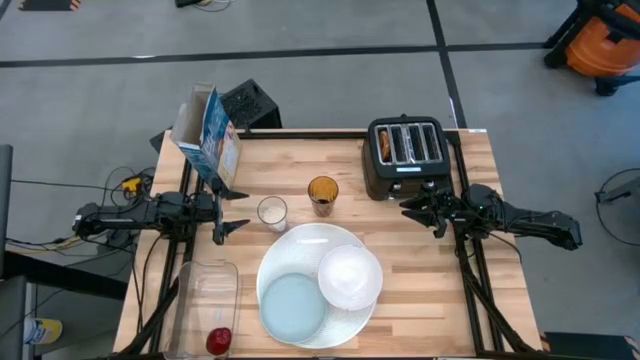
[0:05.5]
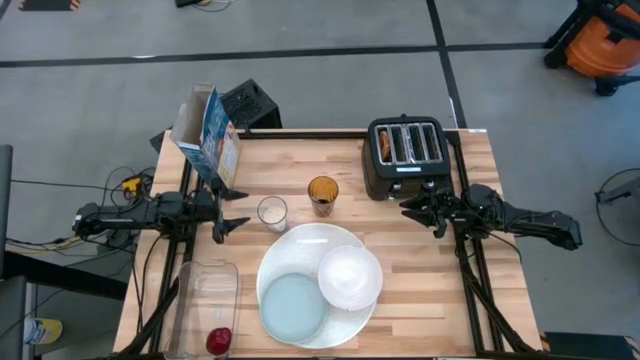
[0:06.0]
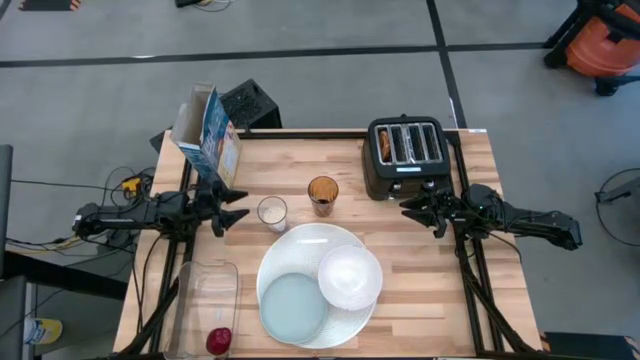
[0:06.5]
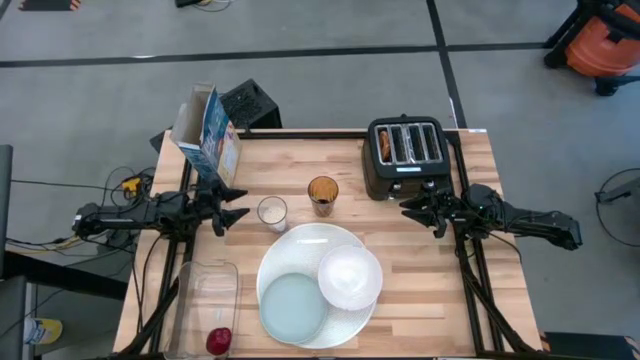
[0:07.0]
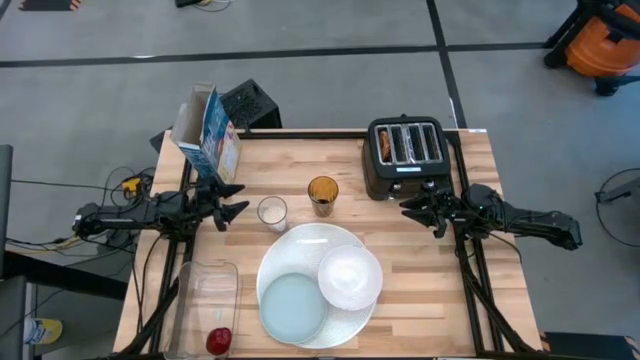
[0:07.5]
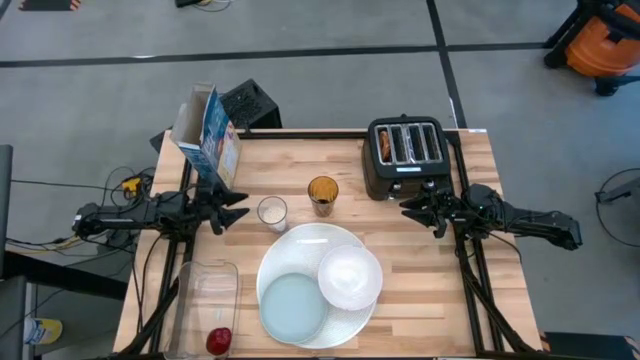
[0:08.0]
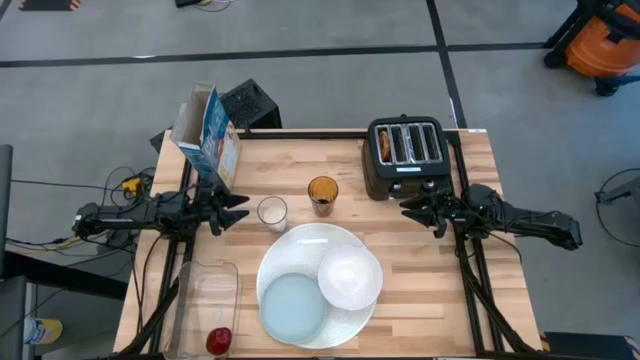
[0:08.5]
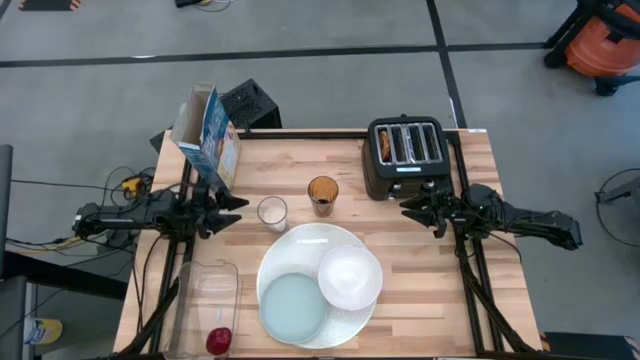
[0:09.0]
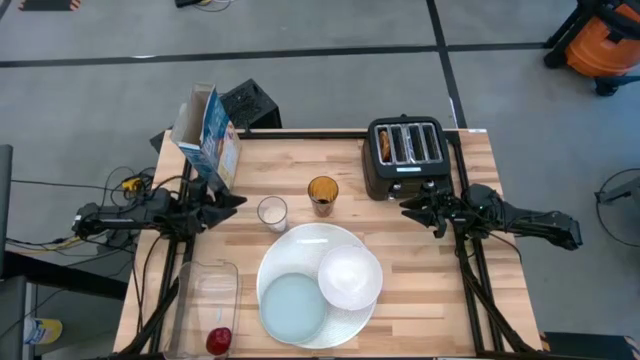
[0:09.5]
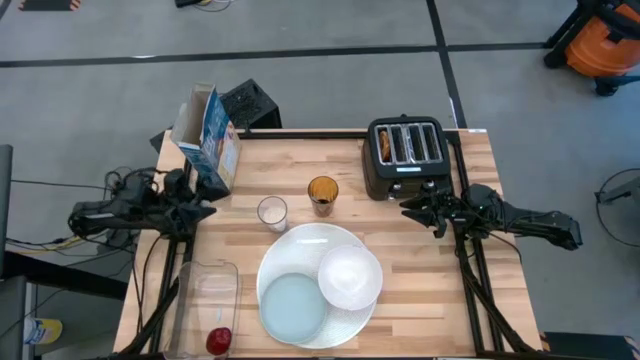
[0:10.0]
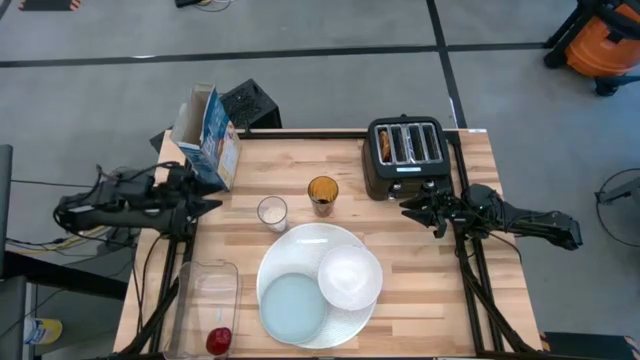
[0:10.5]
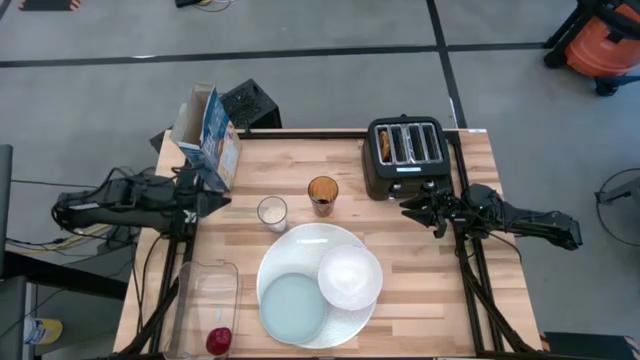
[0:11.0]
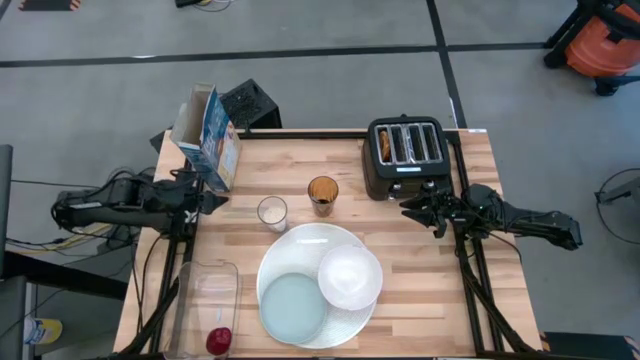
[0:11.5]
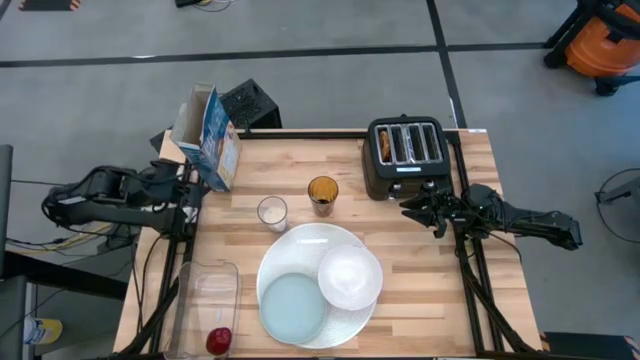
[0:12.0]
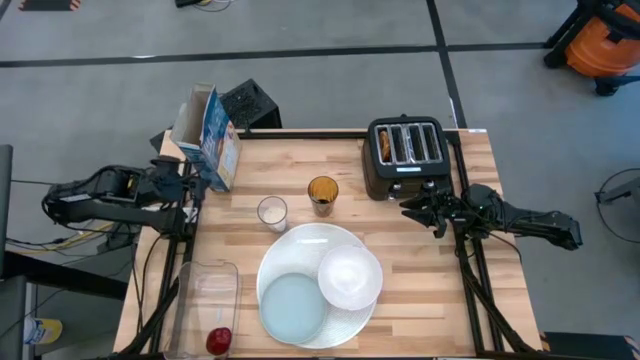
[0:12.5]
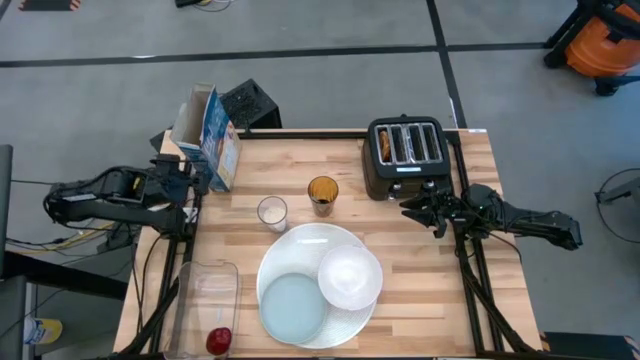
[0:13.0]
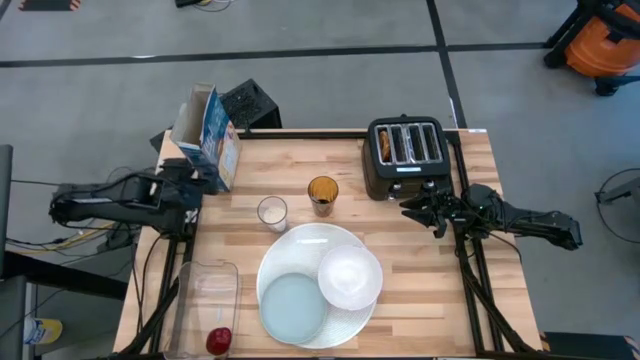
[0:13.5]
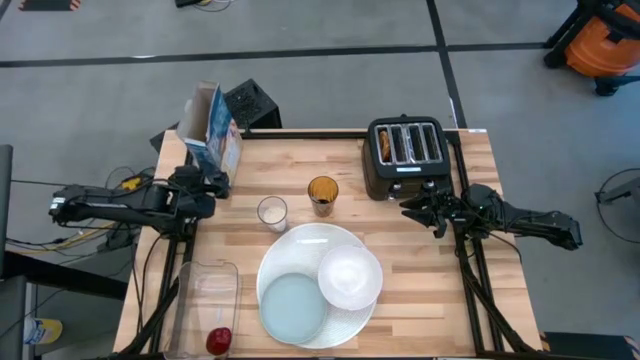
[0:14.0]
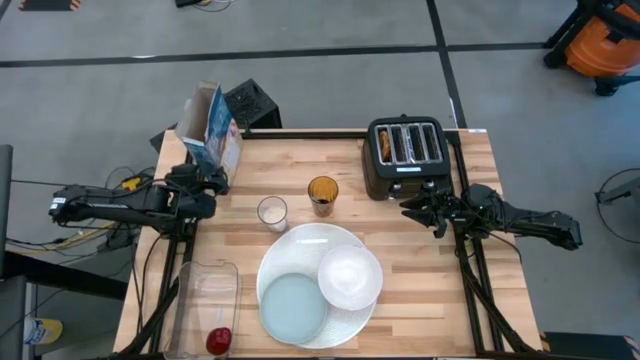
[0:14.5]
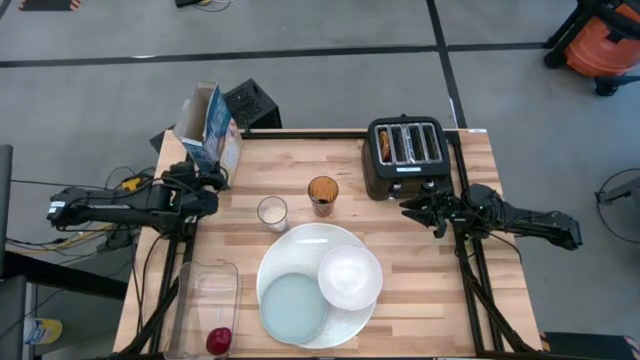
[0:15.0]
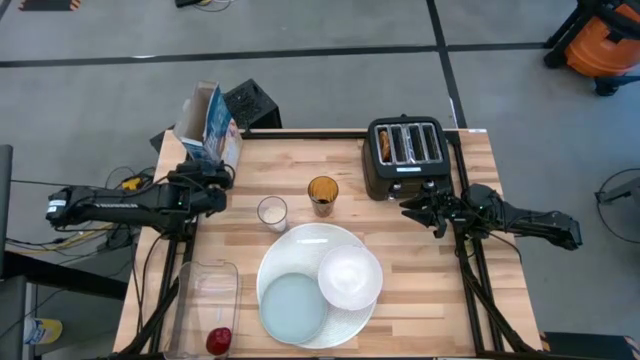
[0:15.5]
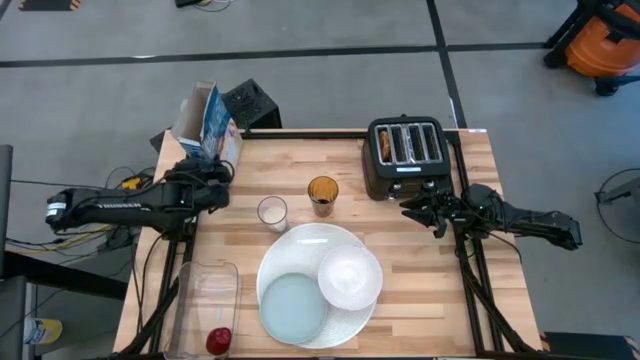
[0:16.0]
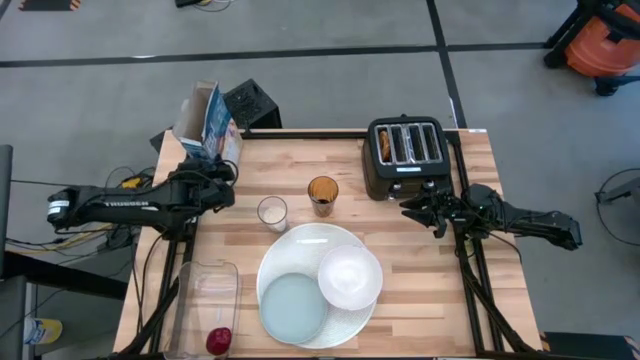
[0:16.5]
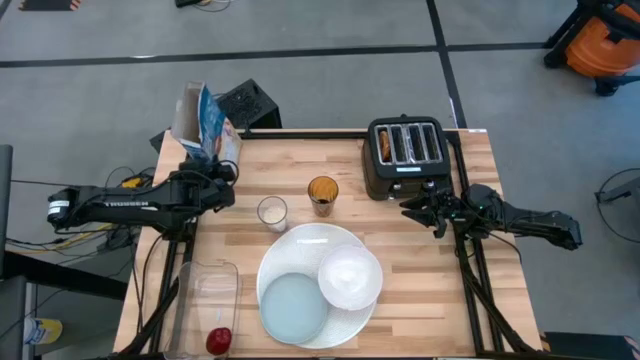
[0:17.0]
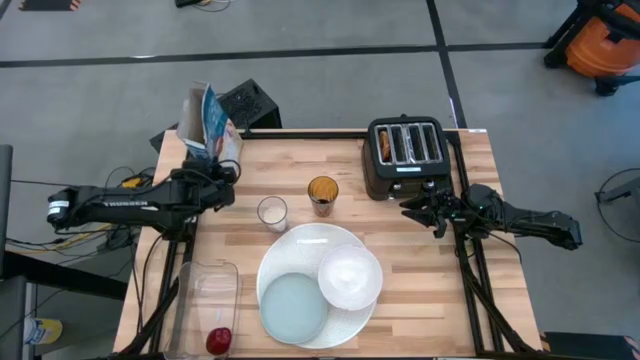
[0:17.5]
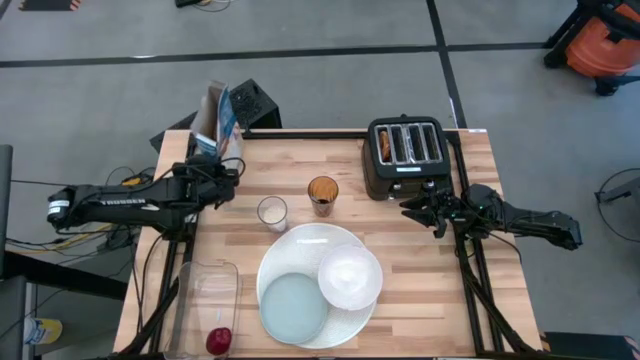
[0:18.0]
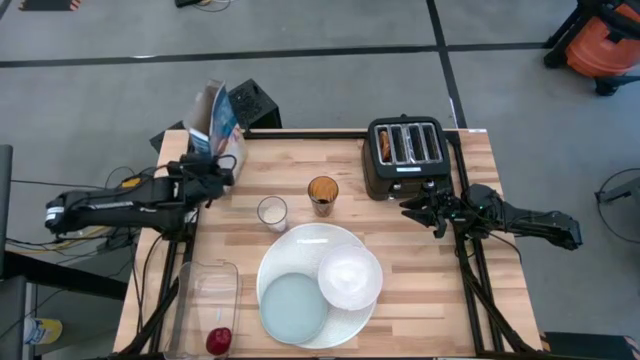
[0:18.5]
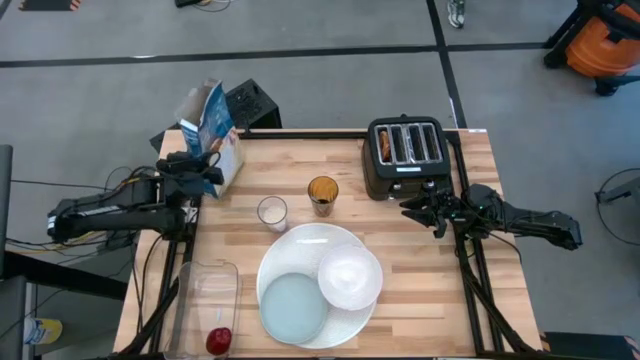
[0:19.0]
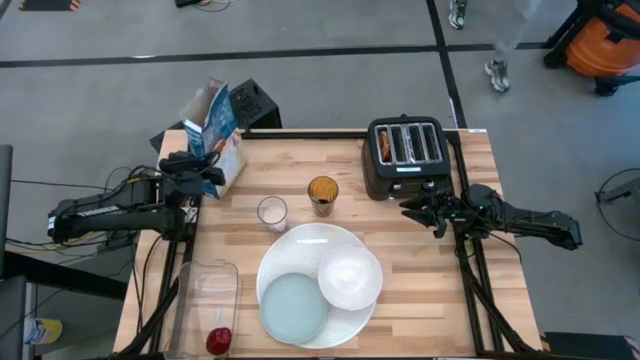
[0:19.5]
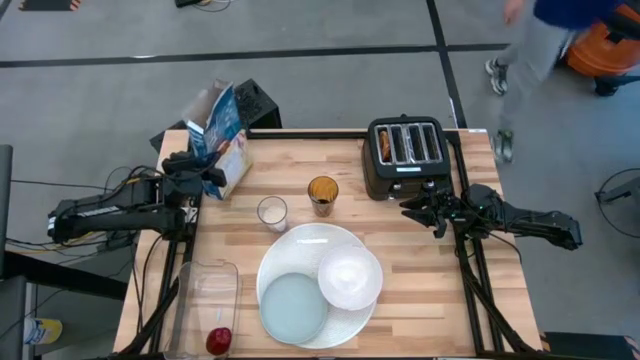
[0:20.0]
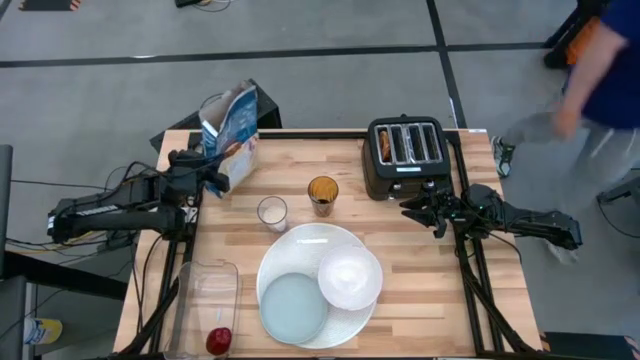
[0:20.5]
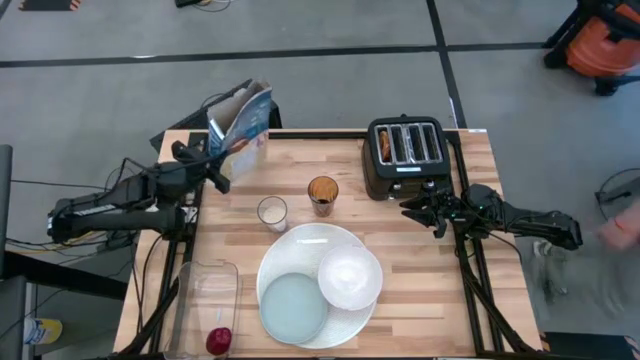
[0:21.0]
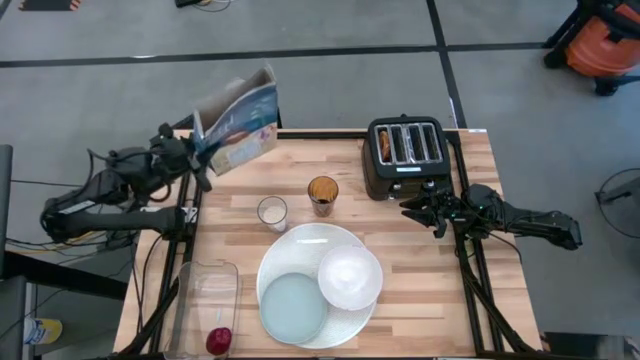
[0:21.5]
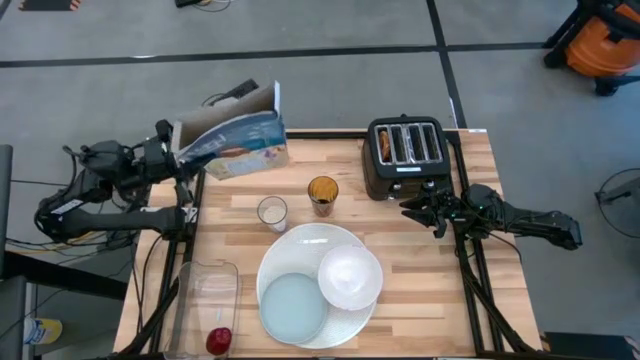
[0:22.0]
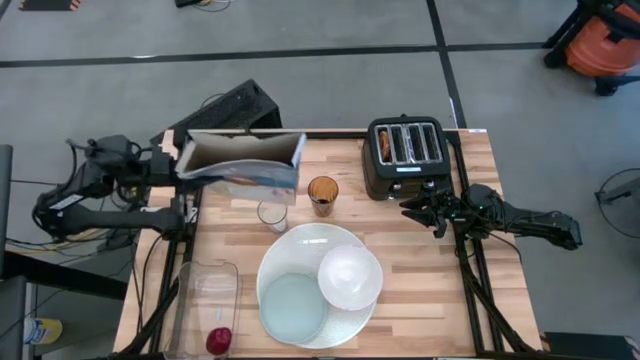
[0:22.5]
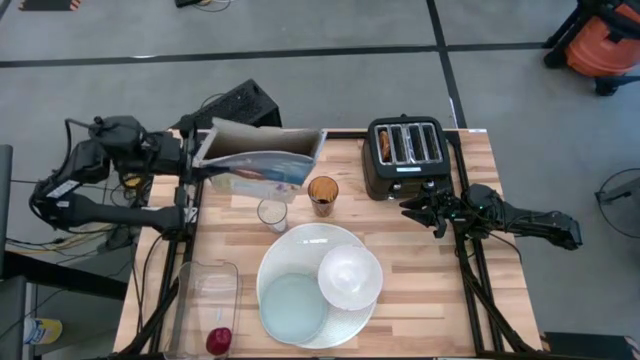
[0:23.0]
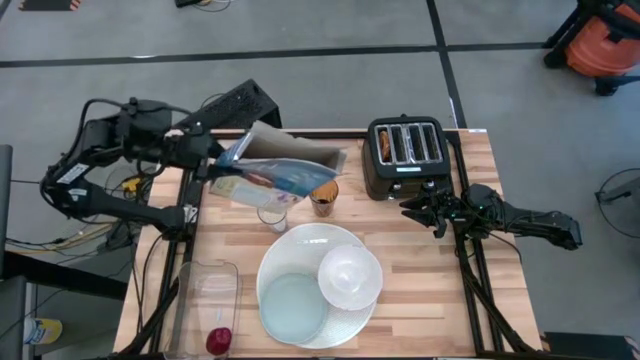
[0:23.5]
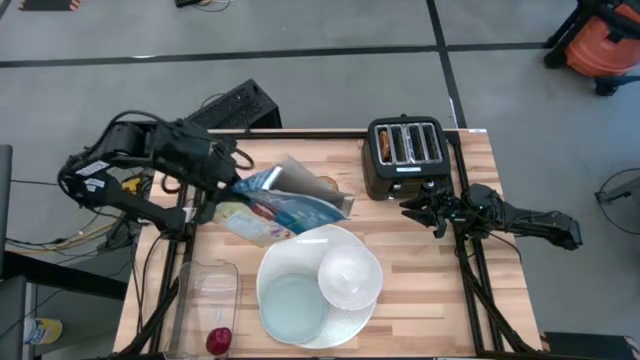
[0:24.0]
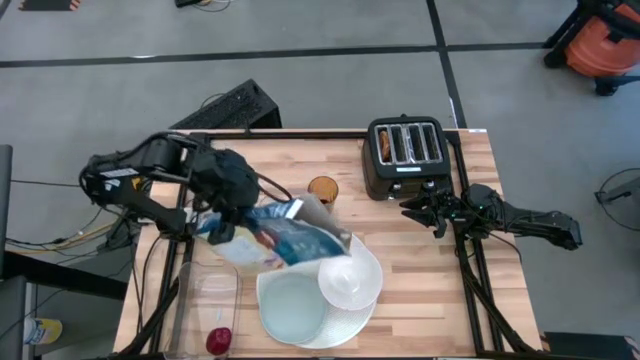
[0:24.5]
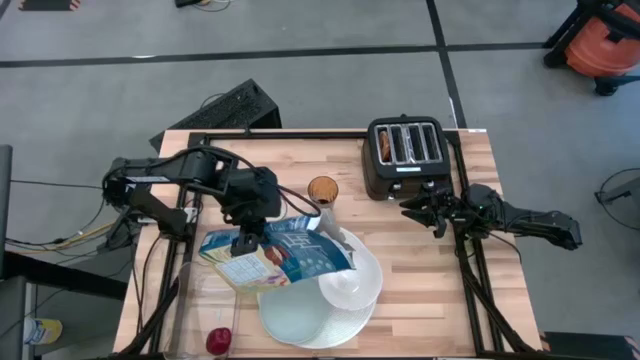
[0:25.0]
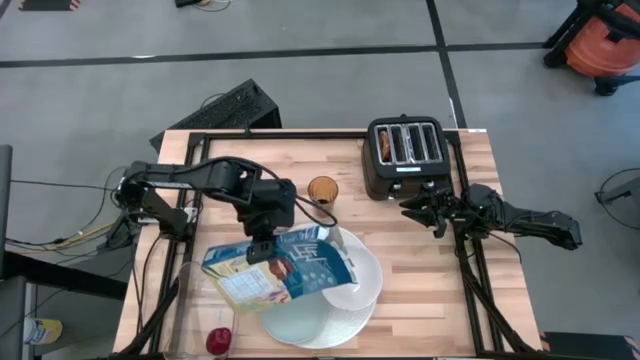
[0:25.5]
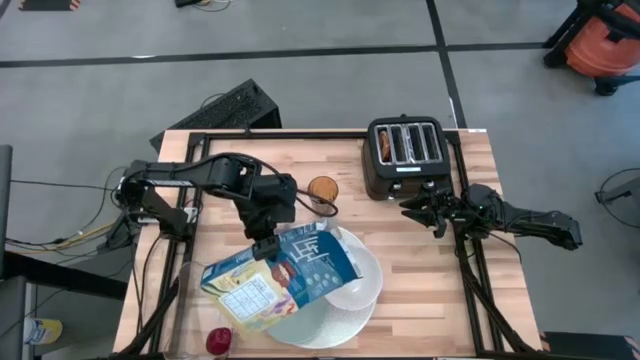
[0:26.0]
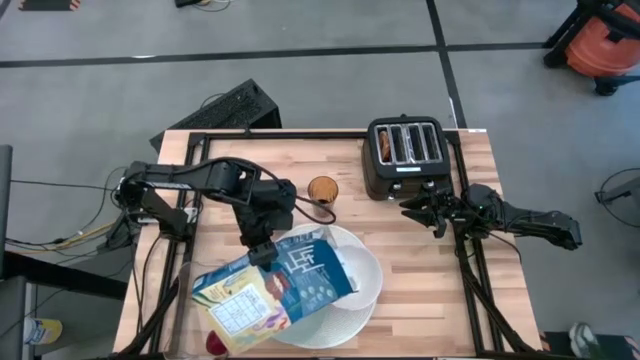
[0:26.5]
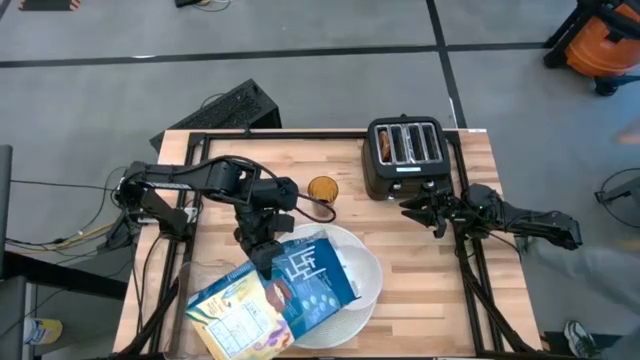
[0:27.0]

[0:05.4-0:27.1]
Task: Arrange a breakfast setting
Pour the cereal into the white bowl
